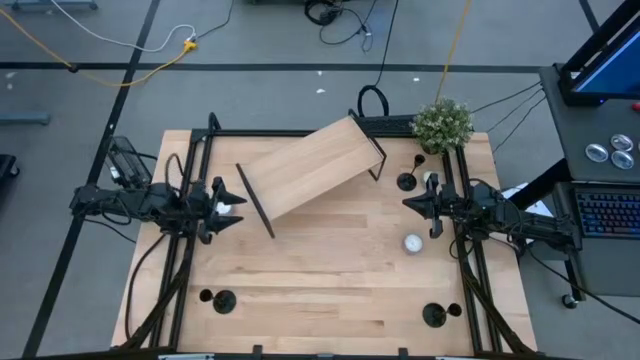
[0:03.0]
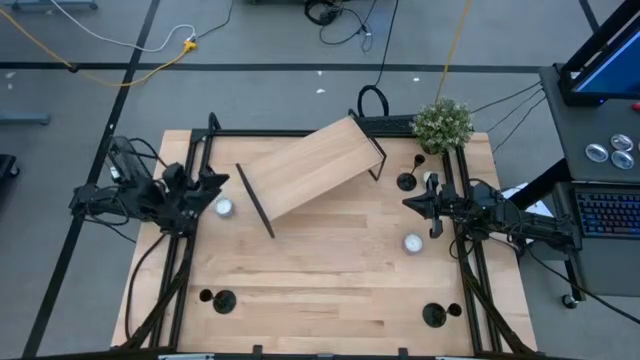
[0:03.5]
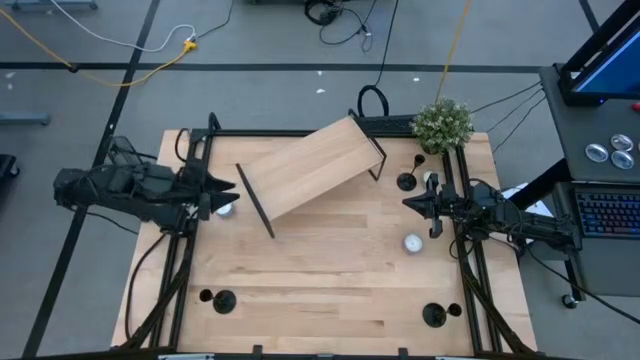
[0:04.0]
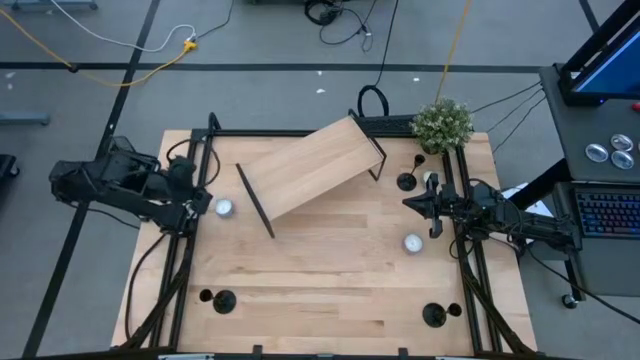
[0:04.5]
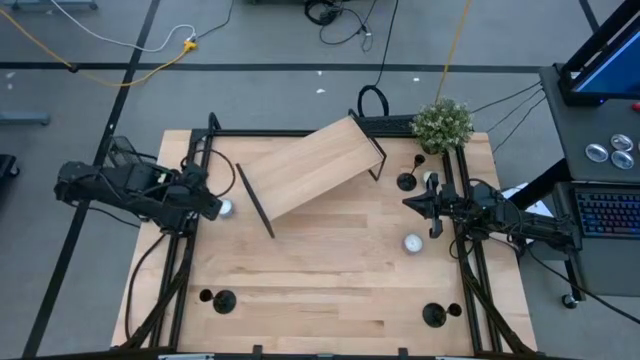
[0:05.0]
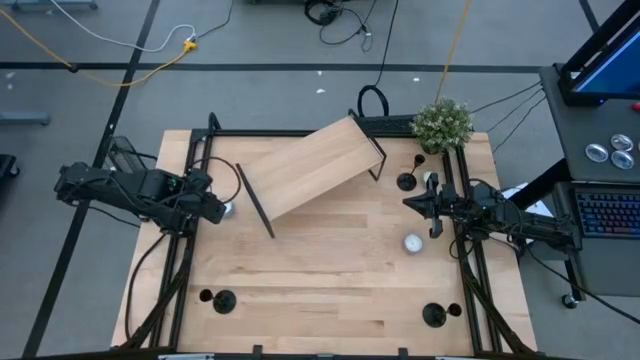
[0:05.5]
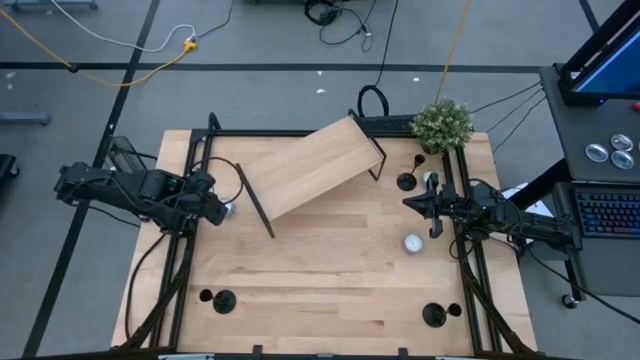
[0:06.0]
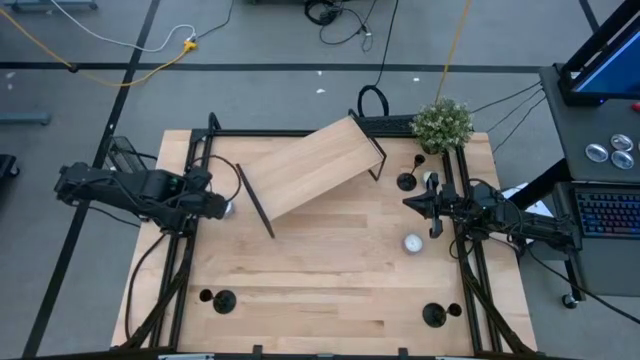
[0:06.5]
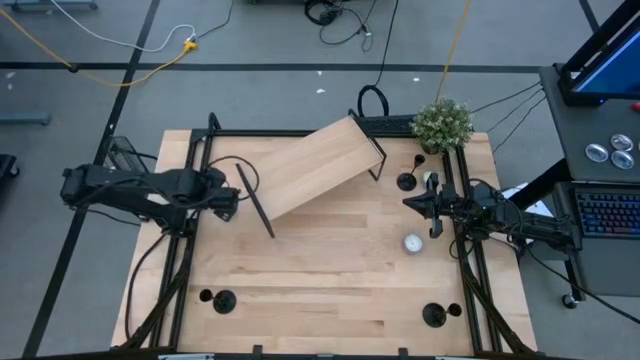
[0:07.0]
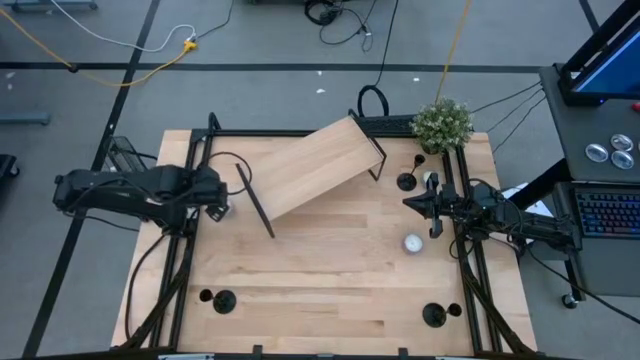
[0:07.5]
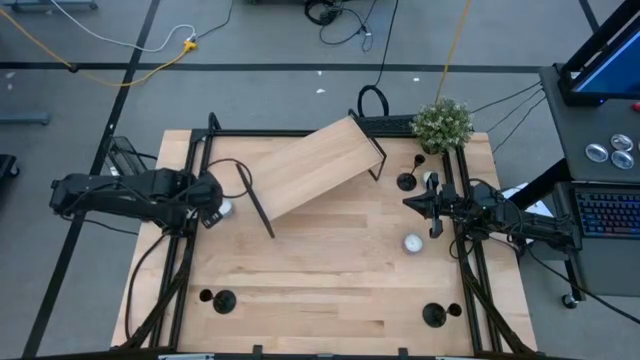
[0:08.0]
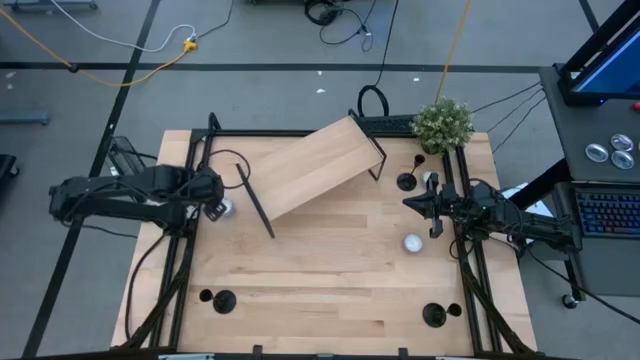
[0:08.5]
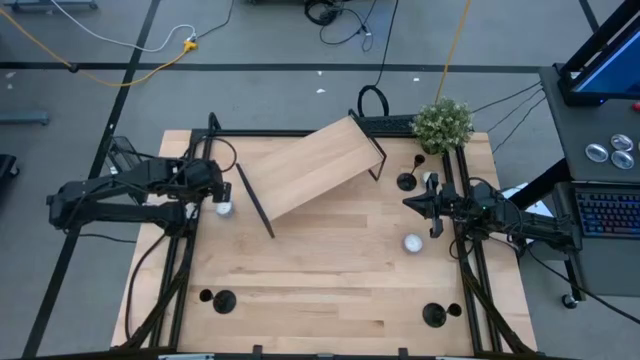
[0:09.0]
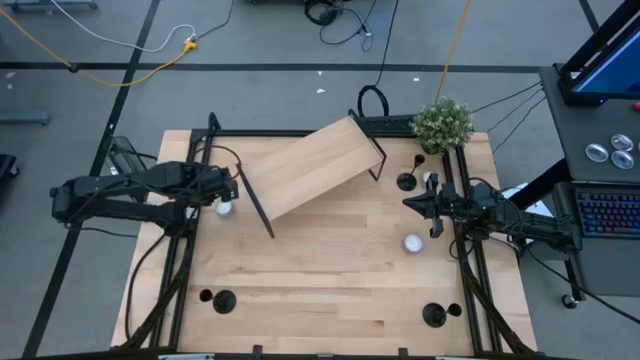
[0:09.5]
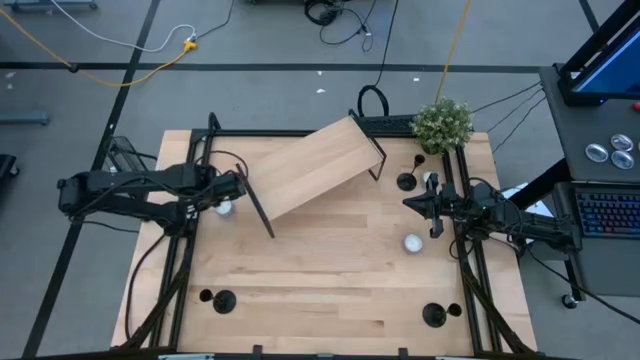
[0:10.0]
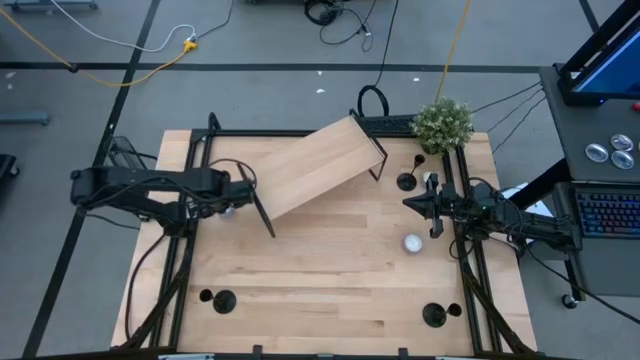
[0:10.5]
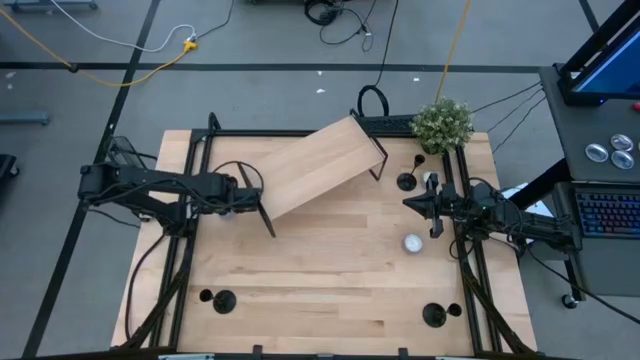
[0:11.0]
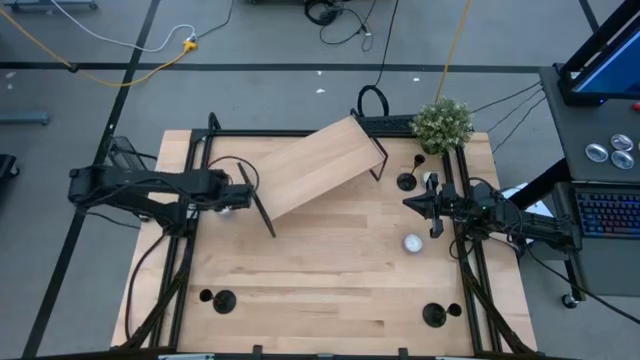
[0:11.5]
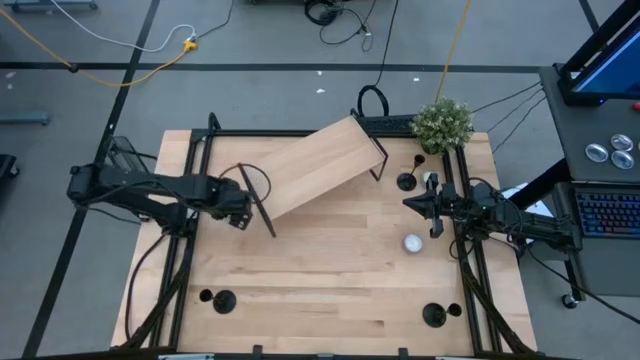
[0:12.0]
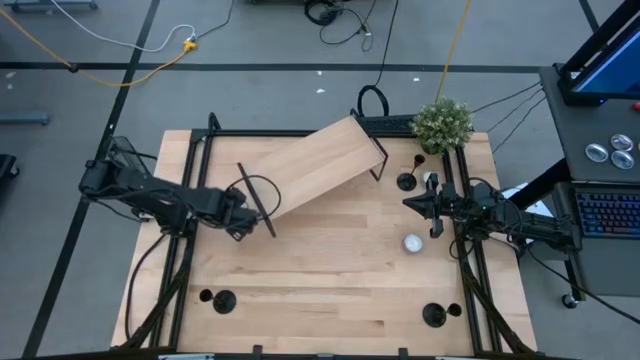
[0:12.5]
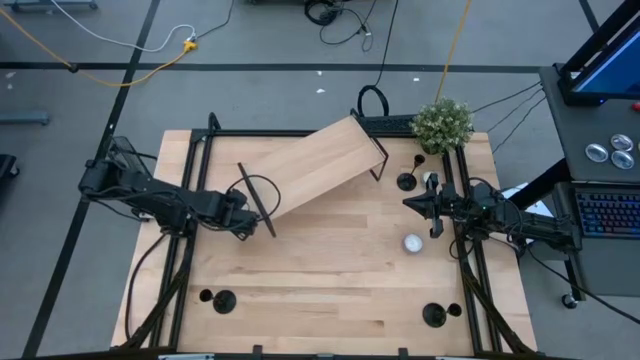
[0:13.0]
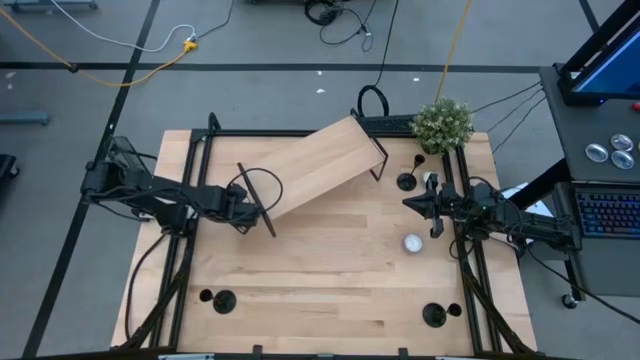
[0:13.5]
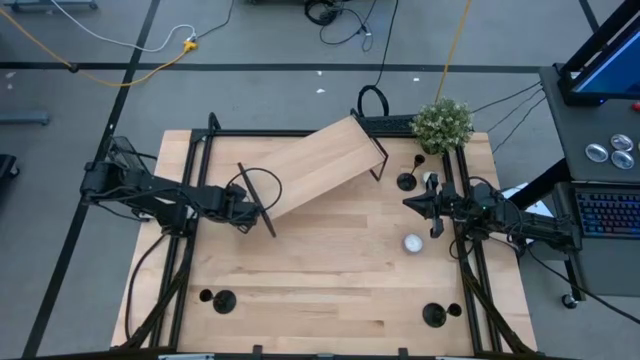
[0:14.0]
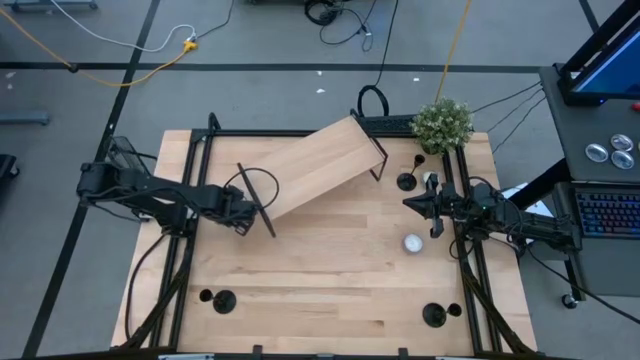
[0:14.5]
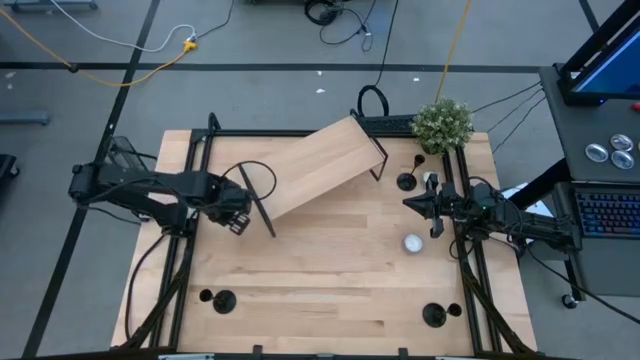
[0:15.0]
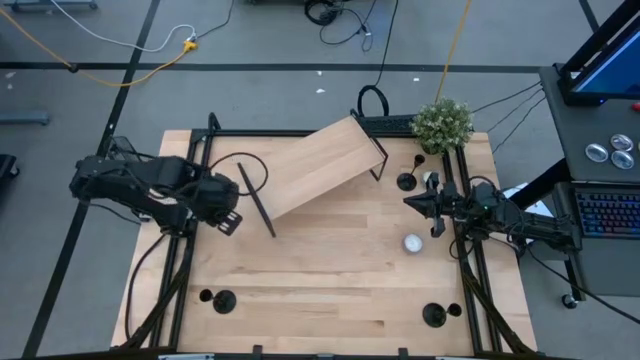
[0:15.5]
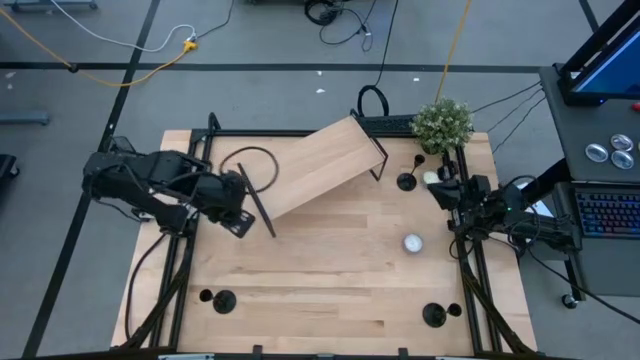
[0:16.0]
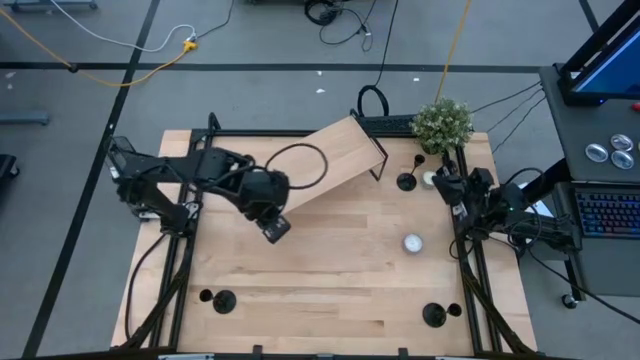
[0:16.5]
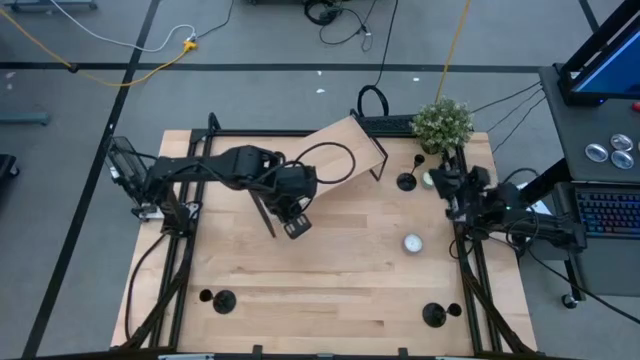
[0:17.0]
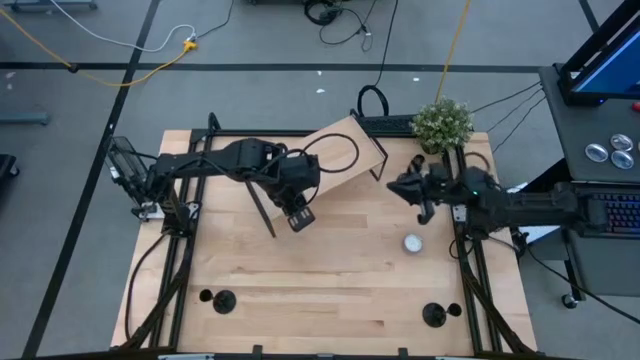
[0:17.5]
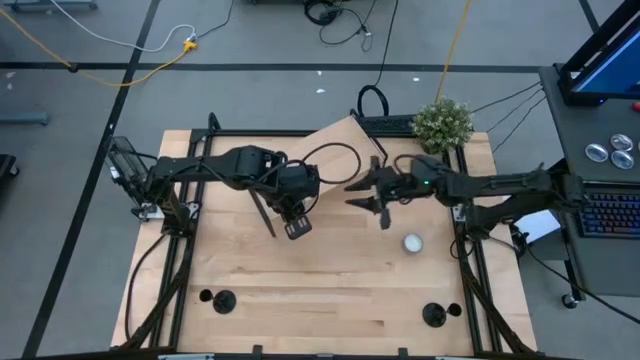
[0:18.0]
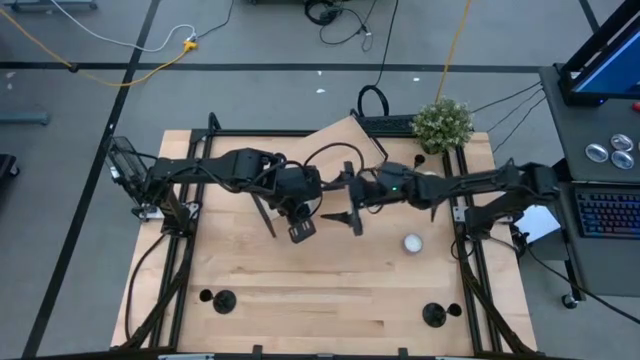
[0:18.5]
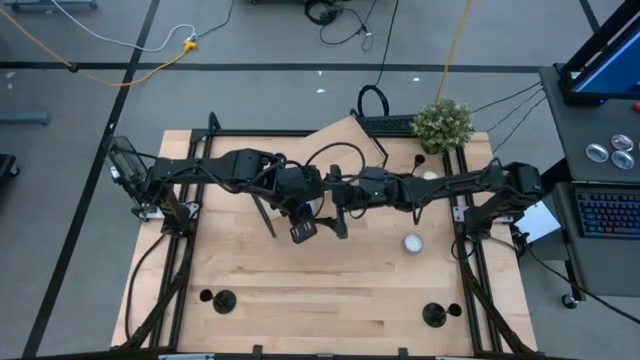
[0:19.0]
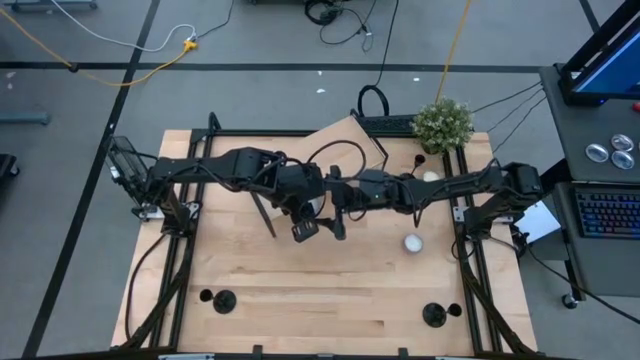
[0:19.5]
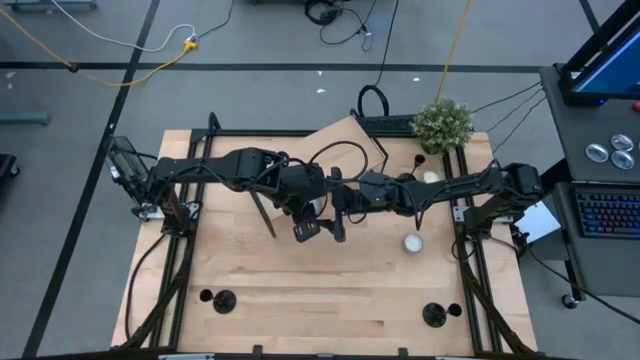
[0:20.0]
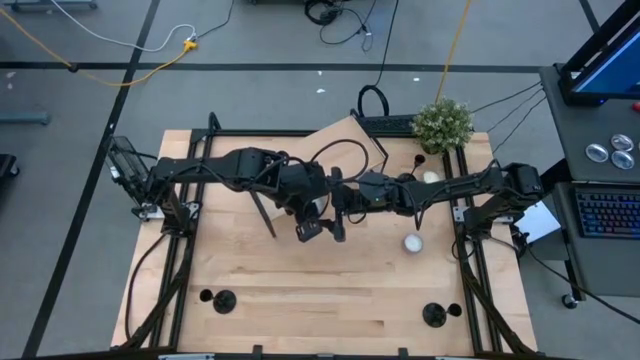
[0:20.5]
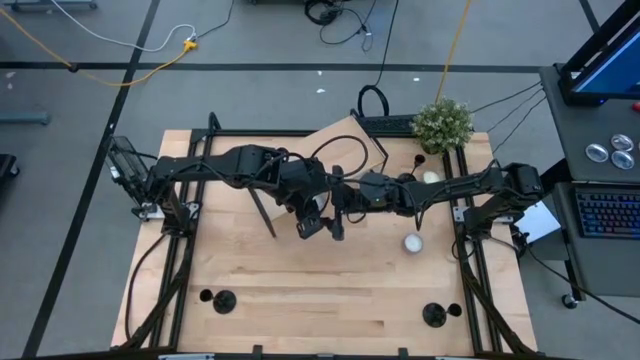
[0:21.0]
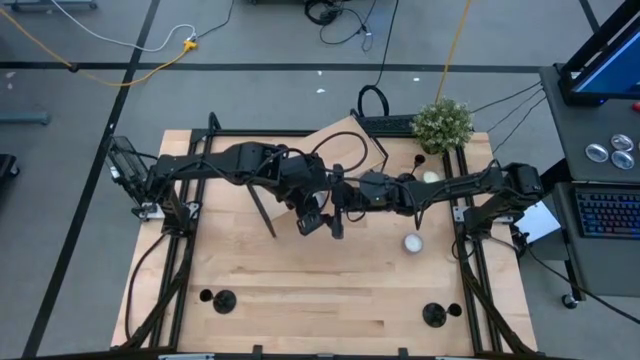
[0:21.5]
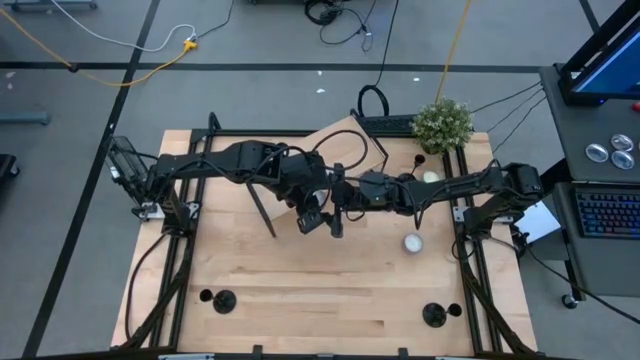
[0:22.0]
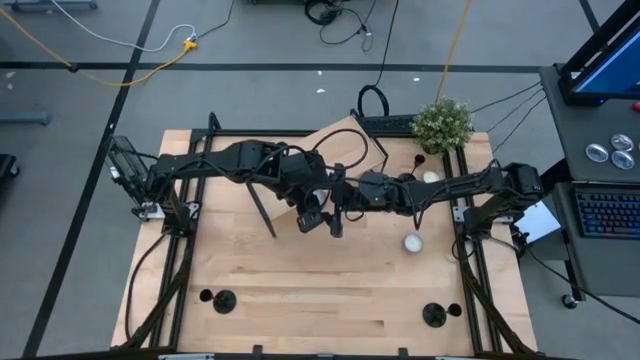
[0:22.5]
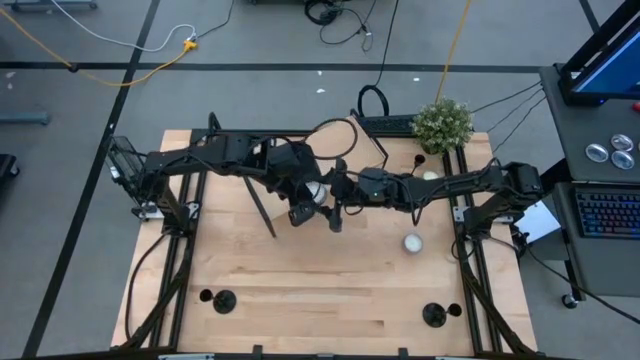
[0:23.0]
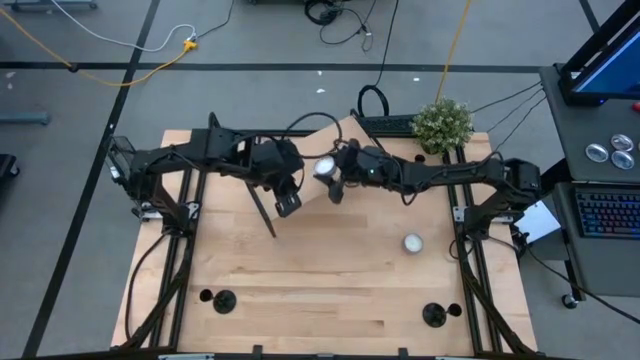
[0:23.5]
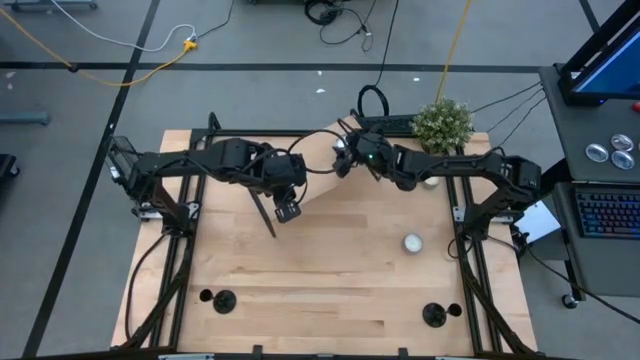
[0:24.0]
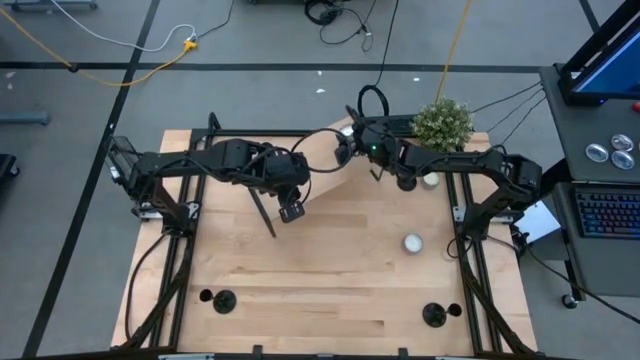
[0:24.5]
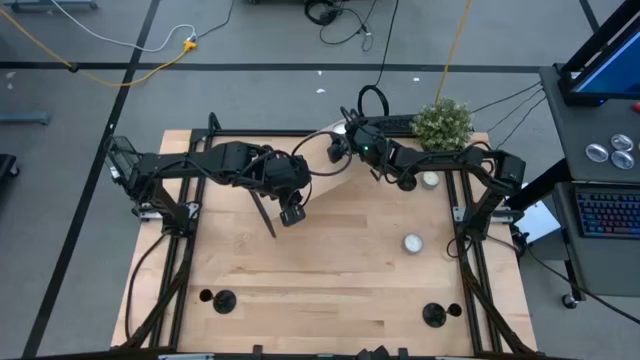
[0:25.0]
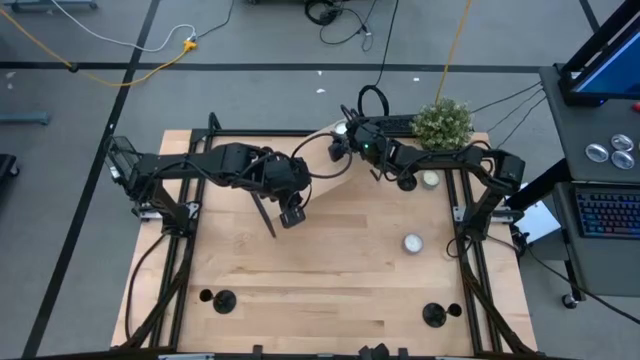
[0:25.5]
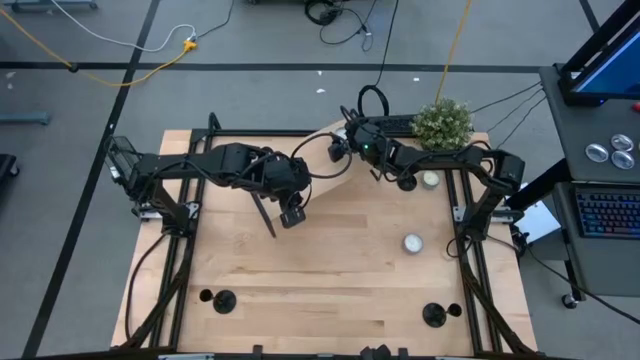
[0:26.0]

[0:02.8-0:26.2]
Task: Pick & Place candle stick holders
Put the red scented candle on the shelf
